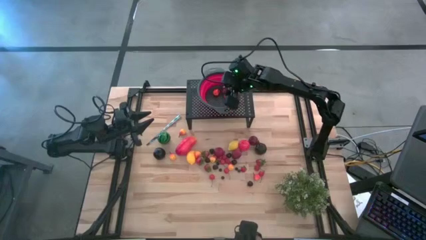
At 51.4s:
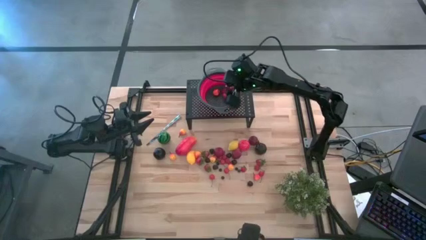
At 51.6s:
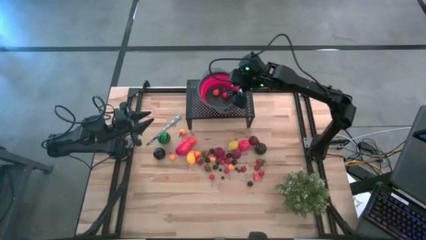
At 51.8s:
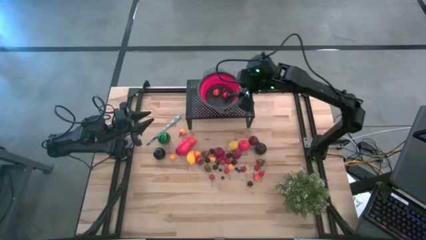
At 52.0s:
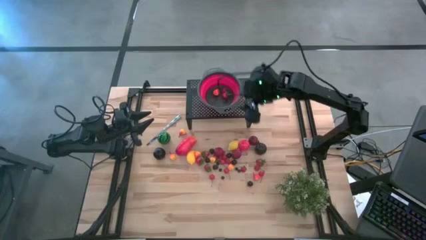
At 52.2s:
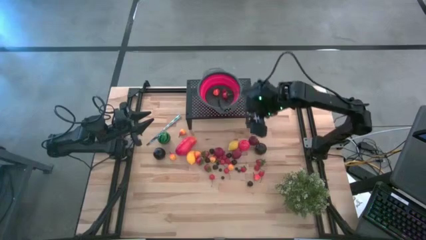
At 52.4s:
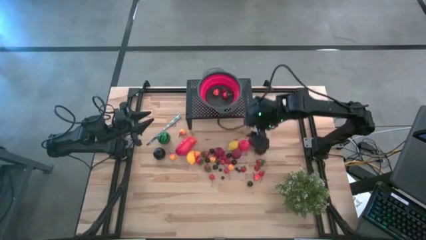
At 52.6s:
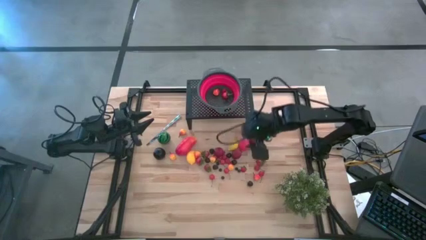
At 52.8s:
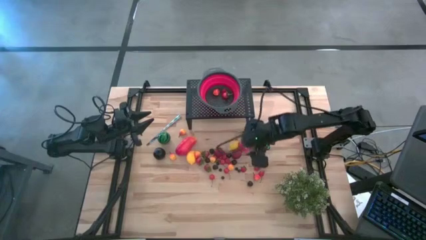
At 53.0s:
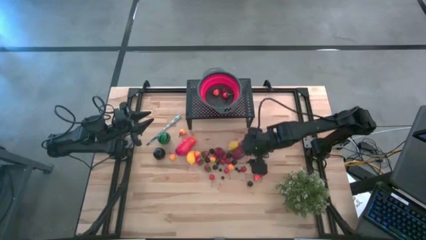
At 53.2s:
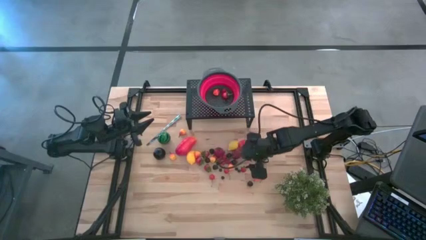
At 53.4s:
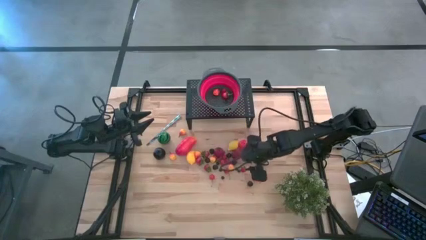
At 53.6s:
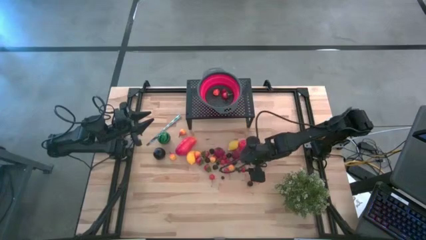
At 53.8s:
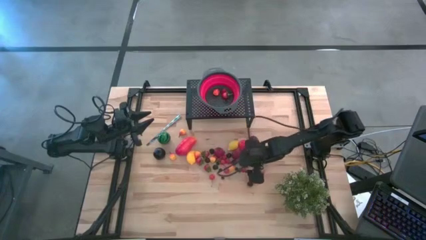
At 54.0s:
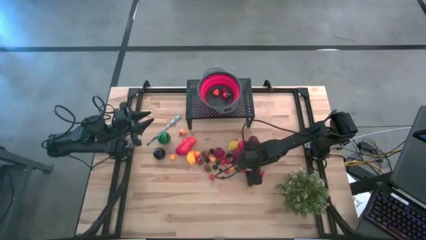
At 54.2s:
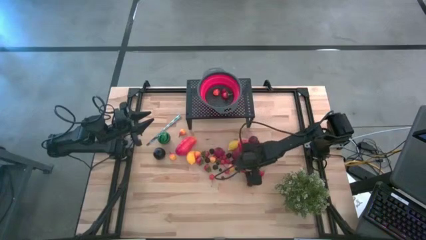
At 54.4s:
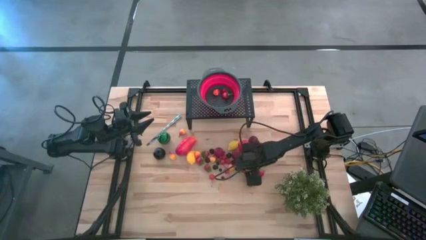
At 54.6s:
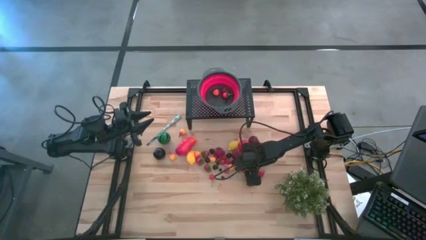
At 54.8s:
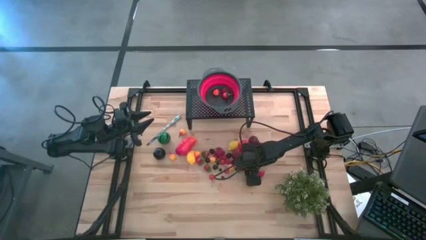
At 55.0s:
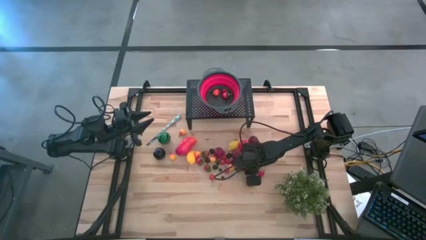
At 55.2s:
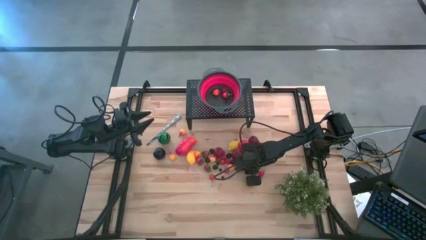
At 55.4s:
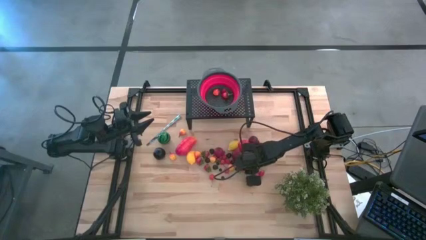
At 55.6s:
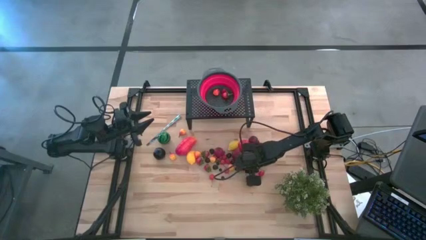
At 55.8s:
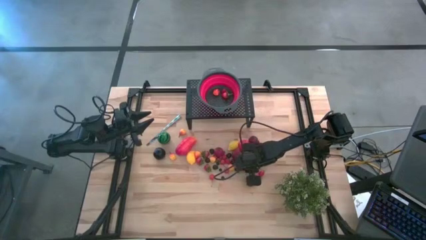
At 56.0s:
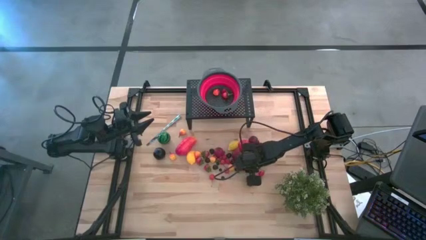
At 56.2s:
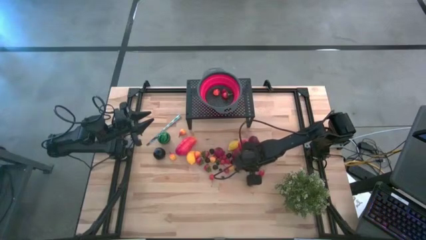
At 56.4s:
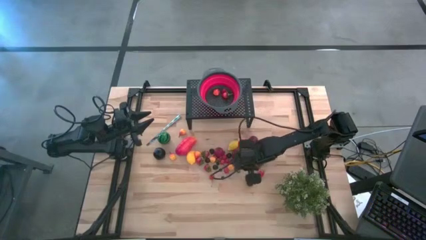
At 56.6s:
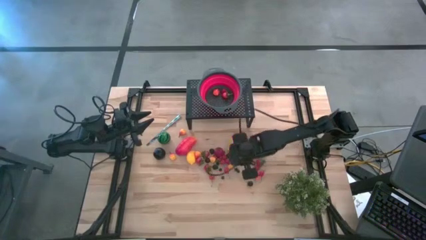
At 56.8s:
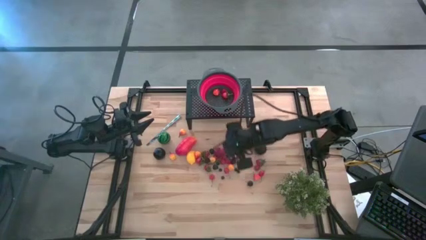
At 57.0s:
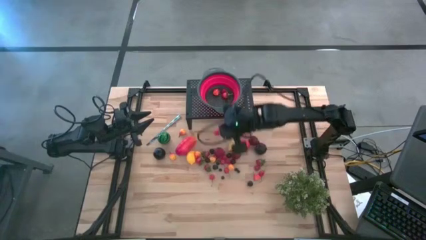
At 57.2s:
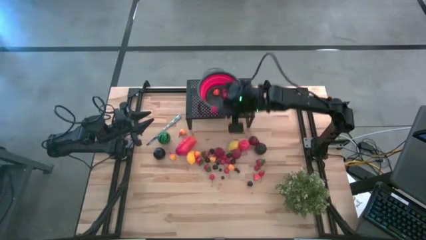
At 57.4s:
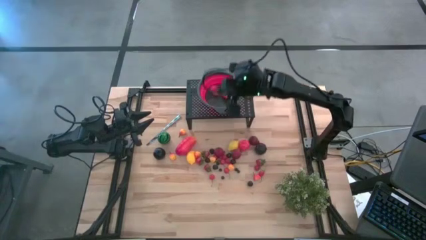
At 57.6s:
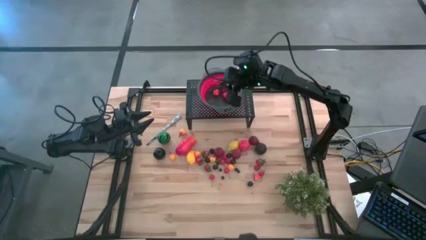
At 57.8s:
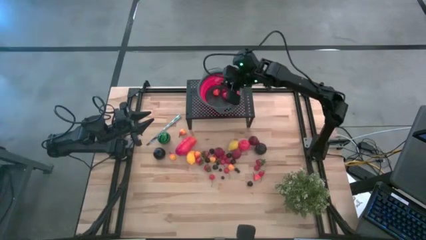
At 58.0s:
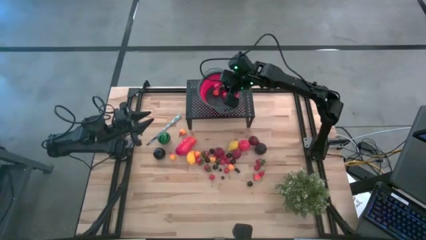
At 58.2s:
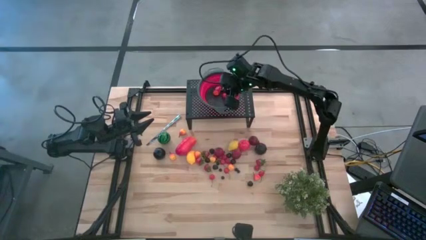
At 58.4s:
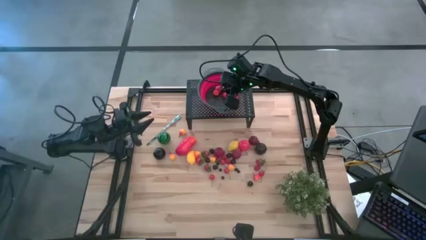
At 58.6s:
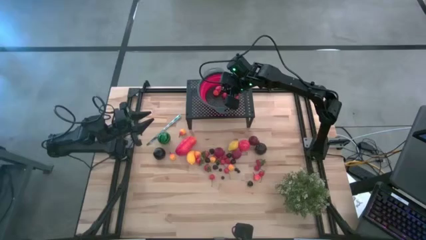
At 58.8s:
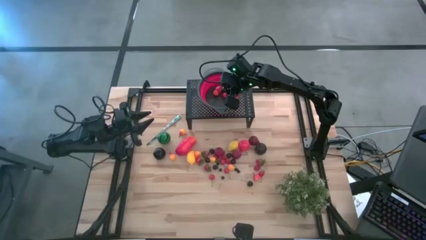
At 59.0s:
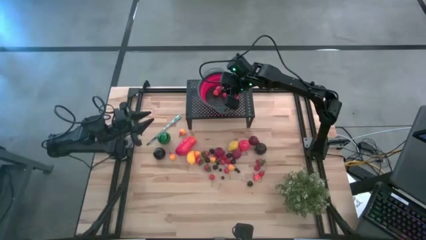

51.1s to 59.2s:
Task: Pick & Place Fruit
Put the strawberry in the red colander on the shelf

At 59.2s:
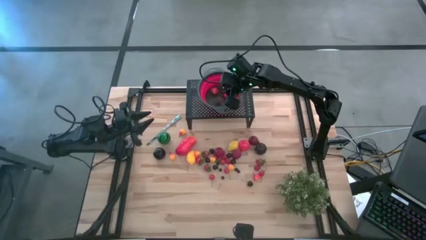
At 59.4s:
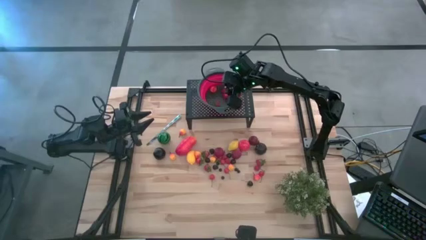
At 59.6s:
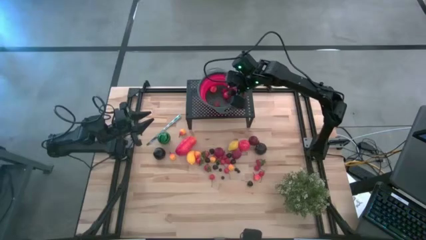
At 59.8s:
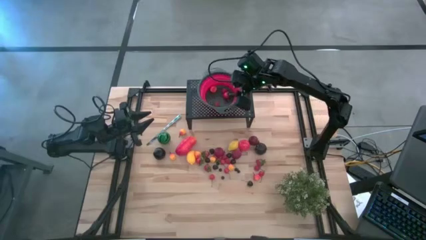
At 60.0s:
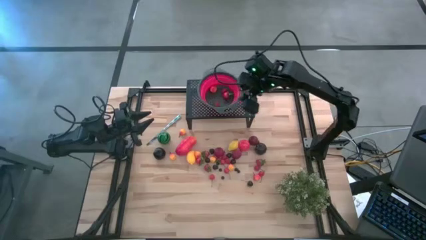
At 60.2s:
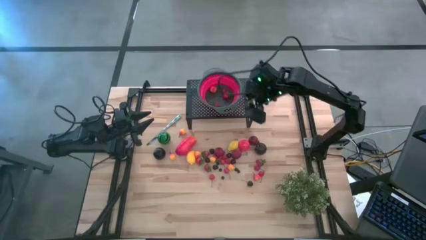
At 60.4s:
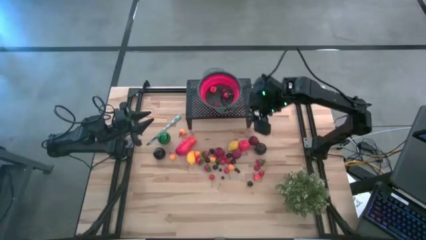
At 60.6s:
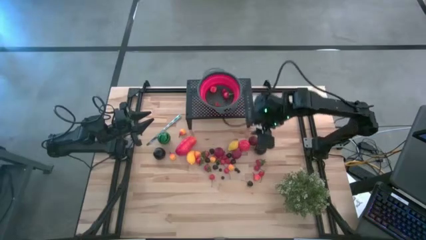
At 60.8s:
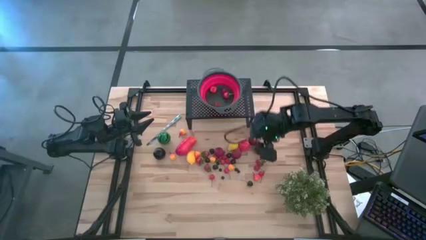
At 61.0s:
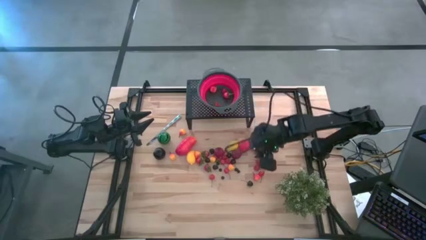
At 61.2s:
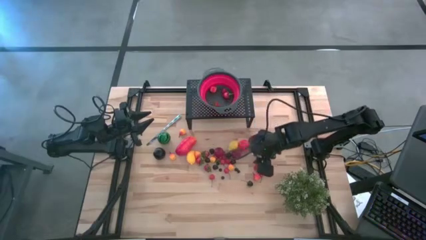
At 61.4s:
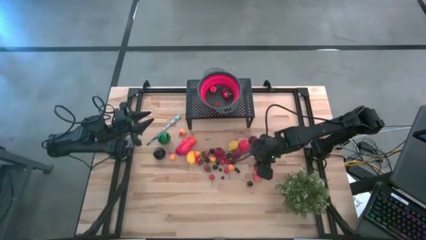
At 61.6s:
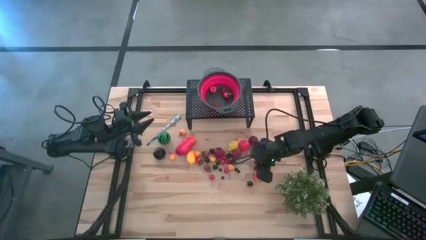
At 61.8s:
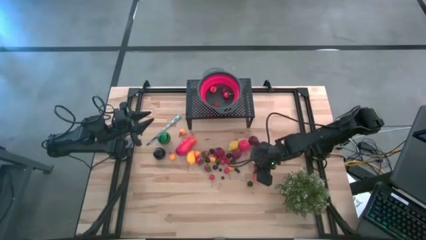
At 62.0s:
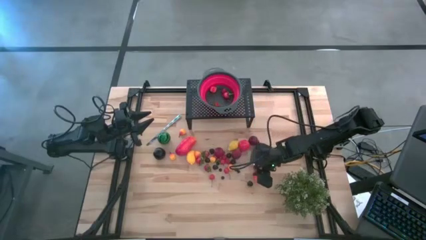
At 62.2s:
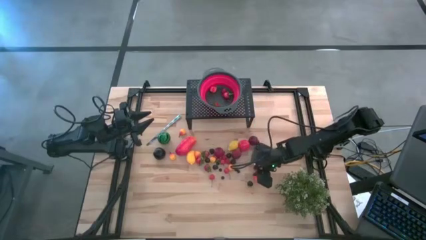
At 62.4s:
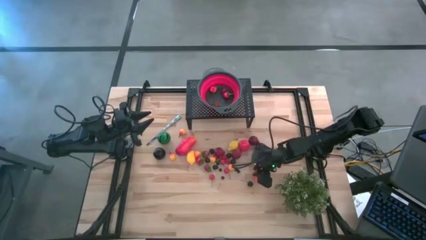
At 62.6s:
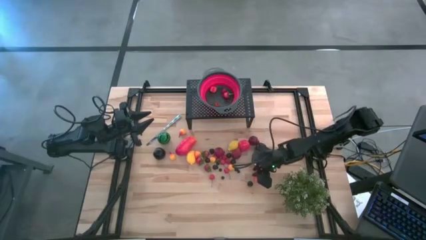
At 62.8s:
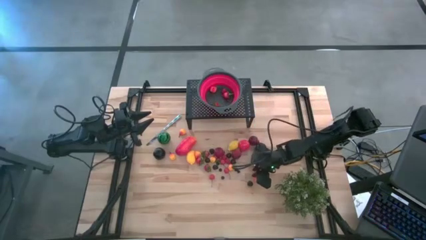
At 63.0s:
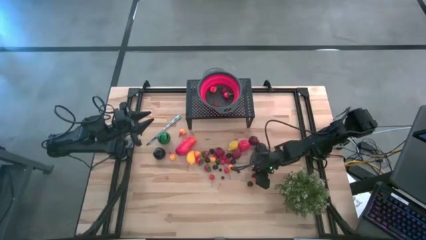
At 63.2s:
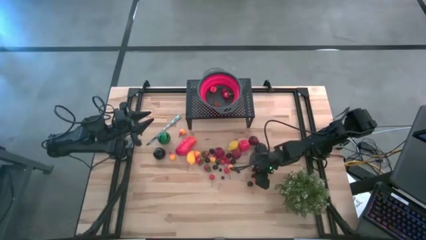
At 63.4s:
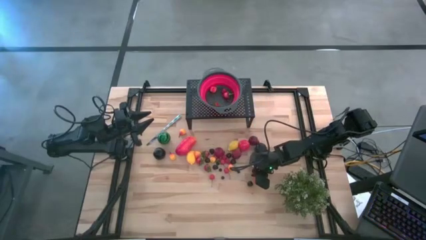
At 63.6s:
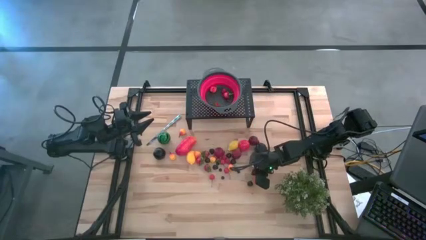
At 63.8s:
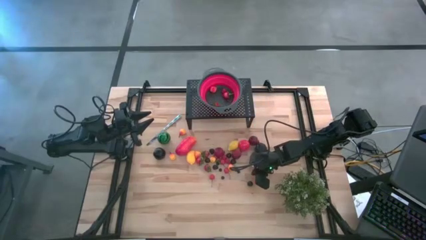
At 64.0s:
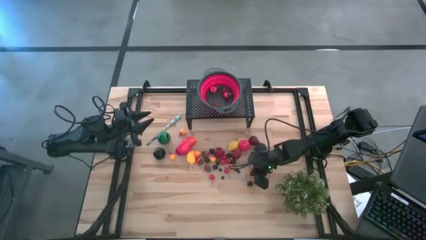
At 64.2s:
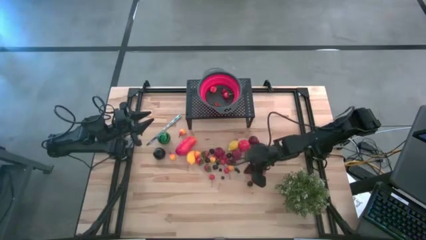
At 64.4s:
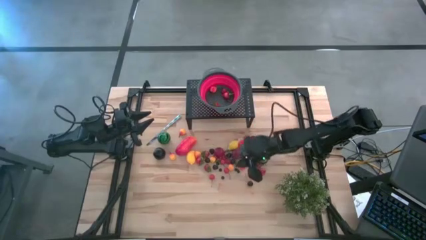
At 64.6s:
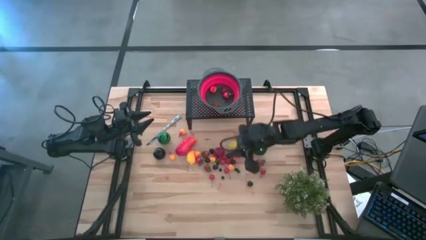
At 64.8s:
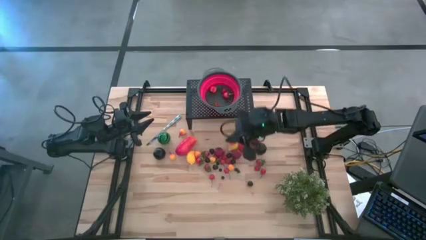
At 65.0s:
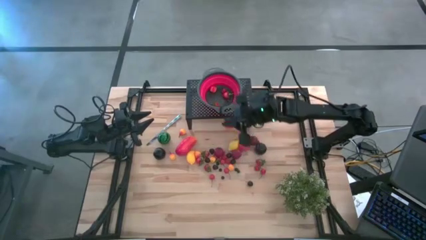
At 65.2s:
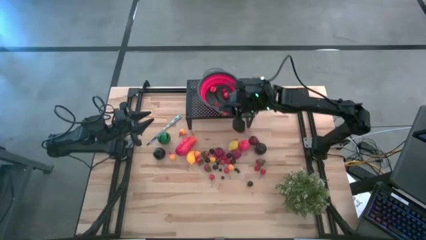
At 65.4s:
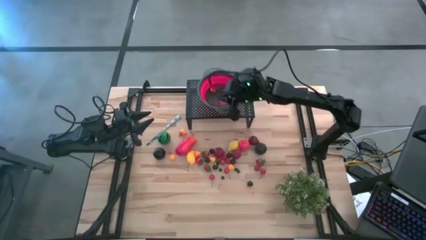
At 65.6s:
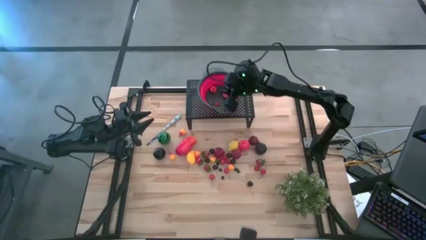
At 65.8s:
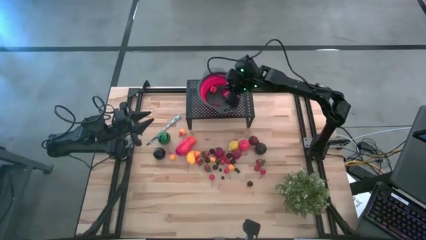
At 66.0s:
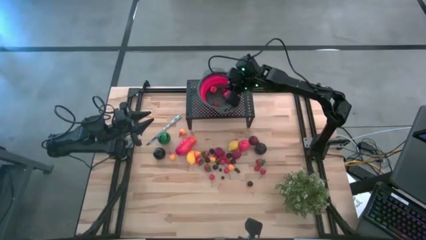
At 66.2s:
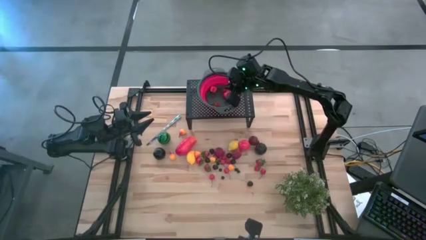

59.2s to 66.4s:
Put the peach in the red colander on the shelf

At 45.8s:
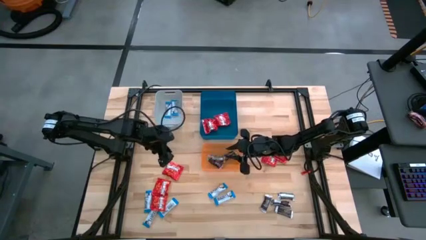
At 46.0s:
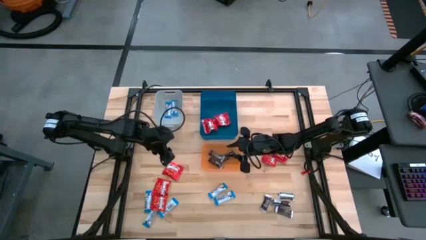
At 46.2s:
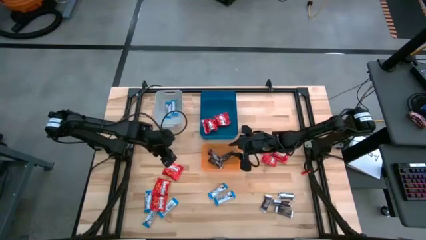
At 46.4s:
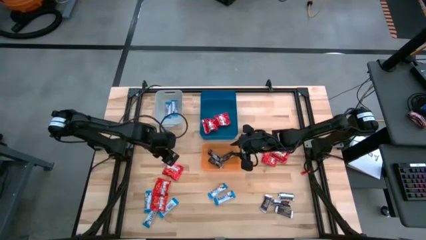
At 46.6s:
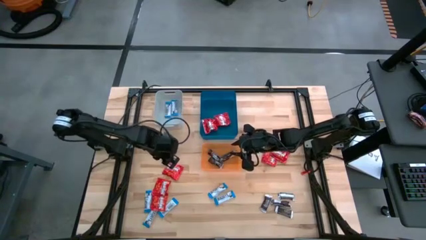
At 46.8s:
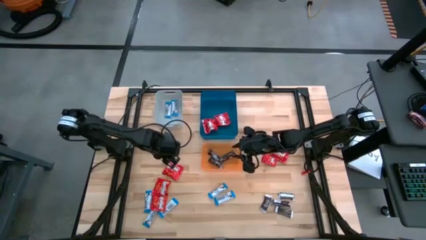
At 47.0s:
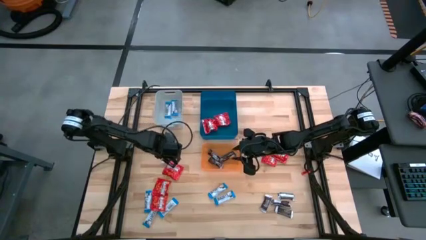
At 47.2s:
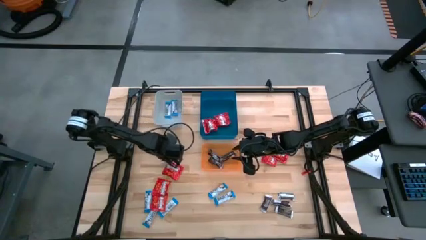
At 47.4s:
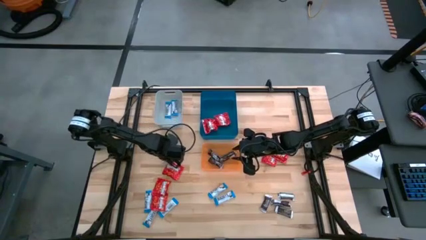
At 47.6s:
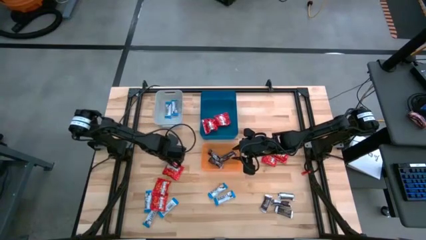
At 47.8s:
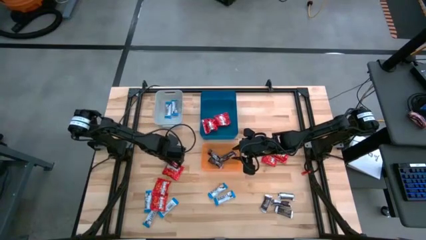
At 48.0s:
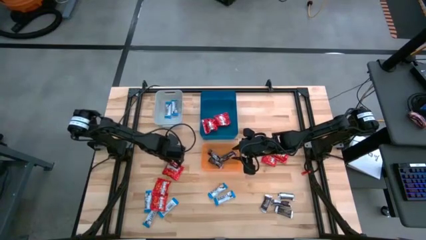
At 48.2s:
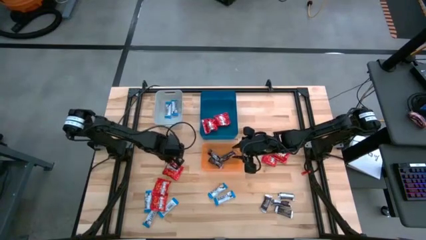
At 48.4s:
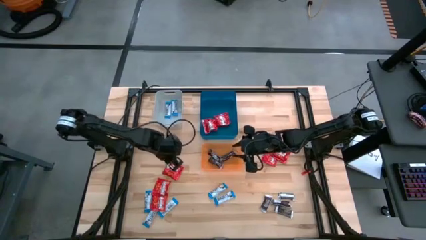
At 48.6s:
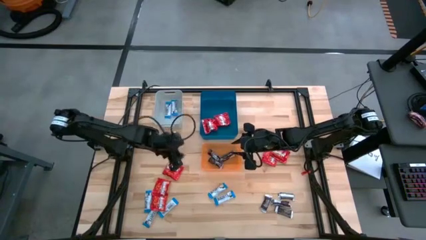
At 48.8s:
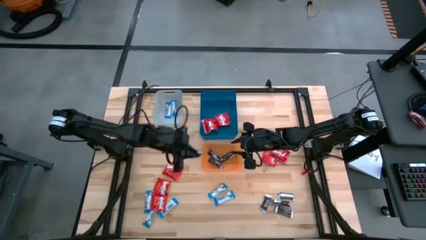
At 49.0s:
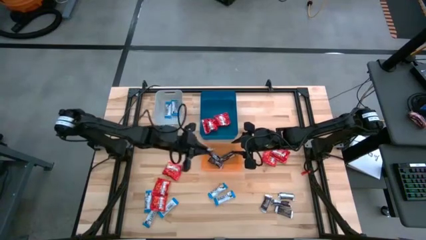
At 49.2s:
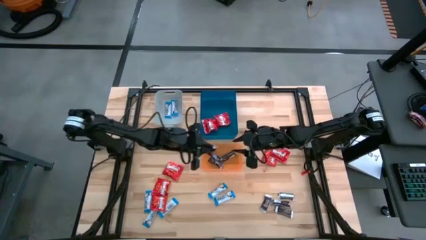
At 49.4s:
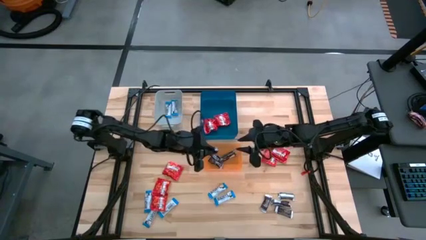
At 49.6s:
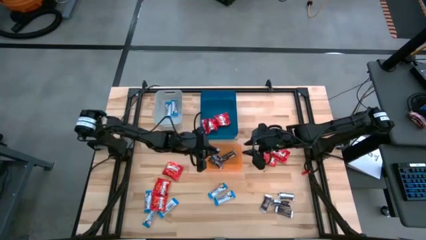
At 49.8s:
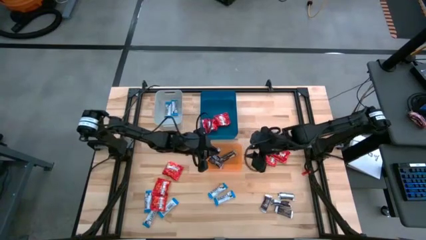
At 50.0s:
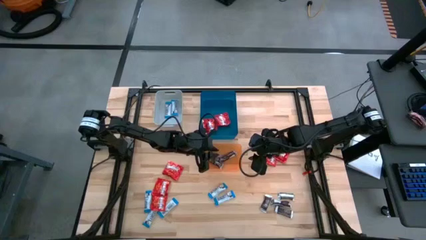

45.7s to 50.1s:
Task: Sort candy
Put the brown chocolate bar into the orange bin
